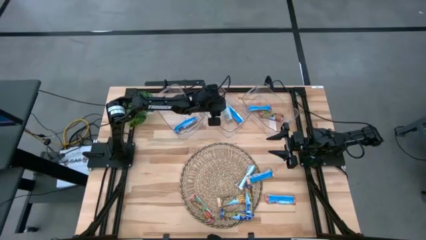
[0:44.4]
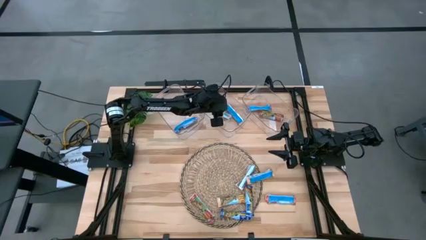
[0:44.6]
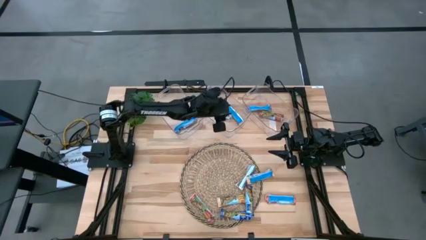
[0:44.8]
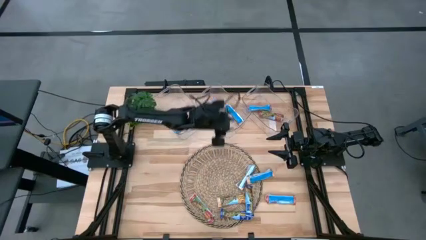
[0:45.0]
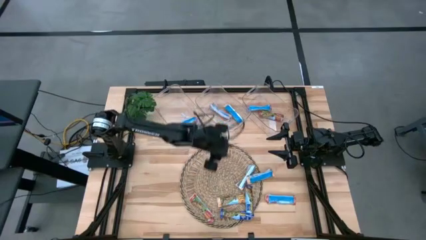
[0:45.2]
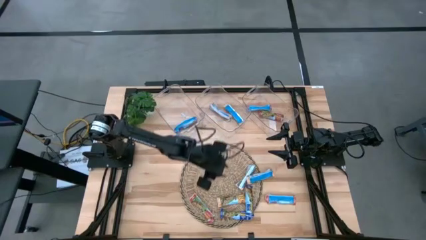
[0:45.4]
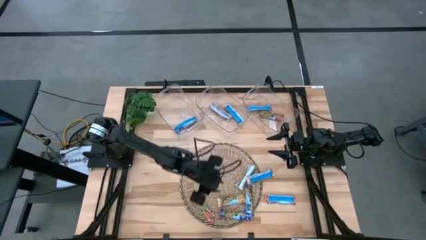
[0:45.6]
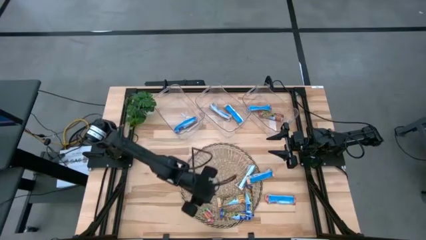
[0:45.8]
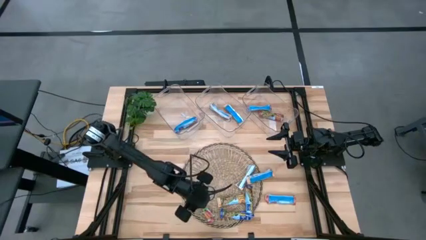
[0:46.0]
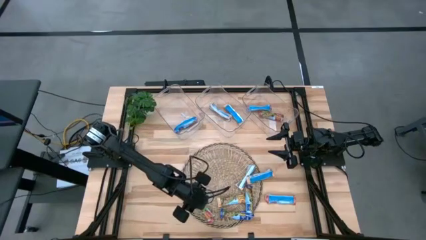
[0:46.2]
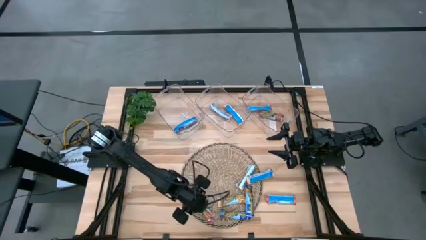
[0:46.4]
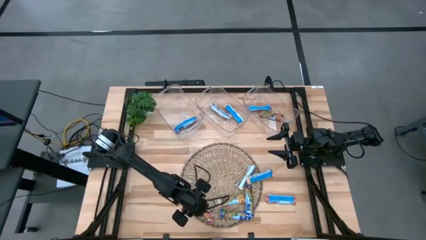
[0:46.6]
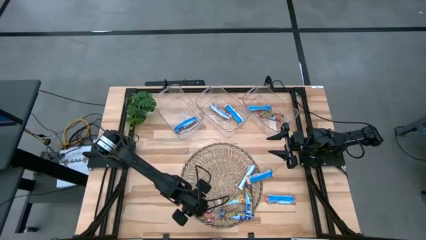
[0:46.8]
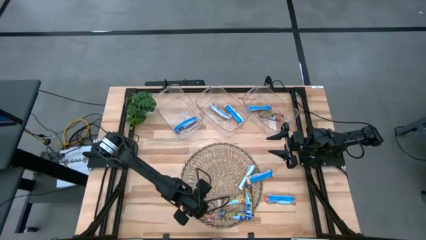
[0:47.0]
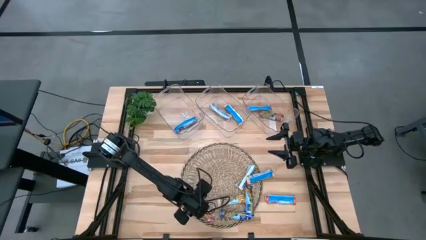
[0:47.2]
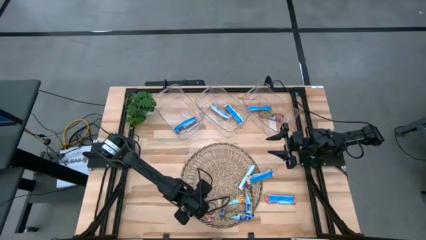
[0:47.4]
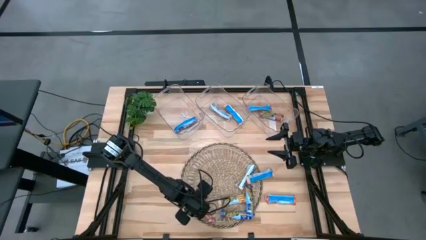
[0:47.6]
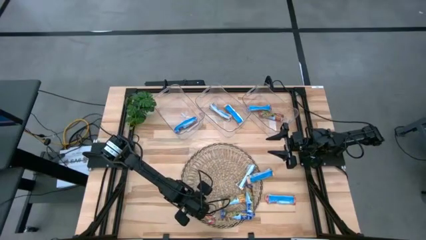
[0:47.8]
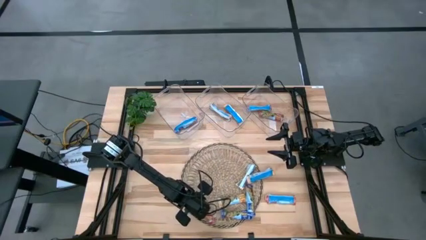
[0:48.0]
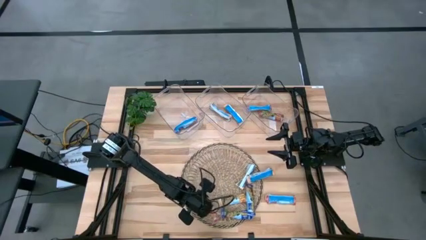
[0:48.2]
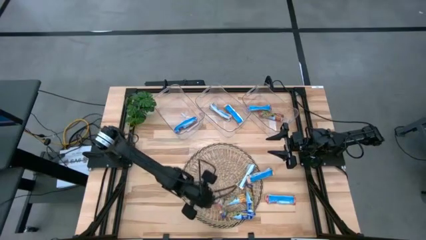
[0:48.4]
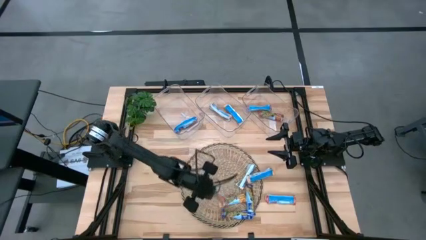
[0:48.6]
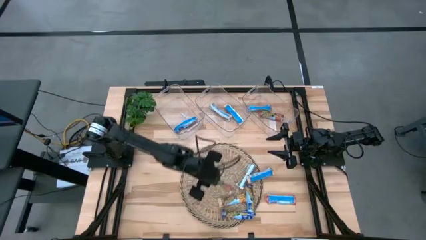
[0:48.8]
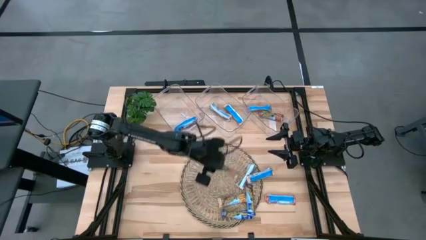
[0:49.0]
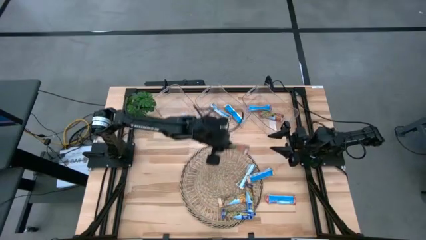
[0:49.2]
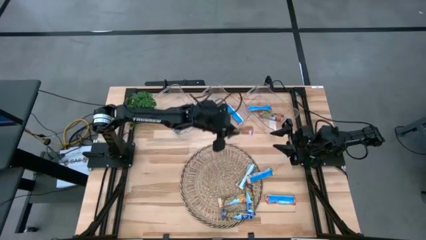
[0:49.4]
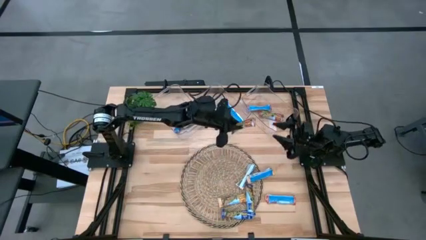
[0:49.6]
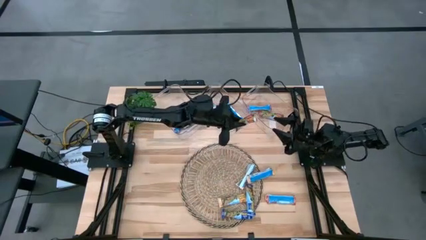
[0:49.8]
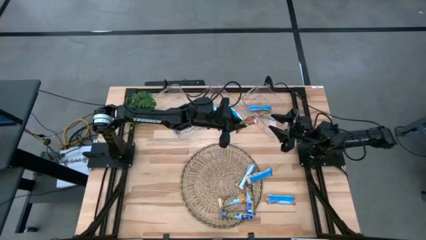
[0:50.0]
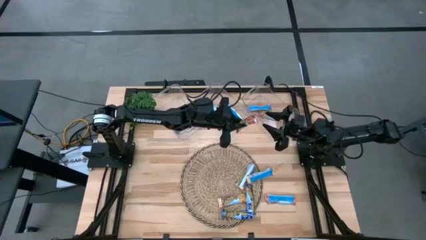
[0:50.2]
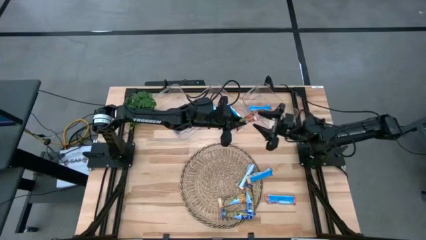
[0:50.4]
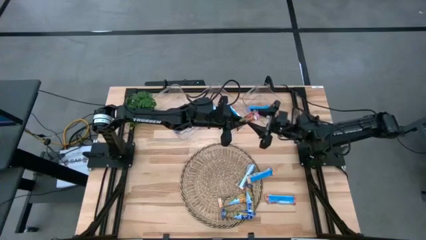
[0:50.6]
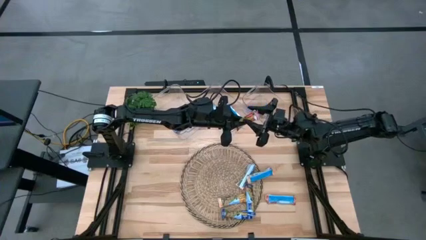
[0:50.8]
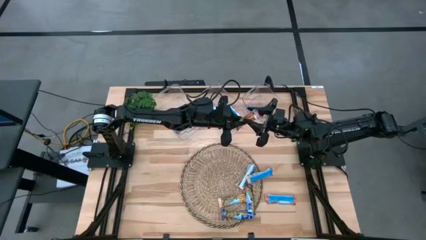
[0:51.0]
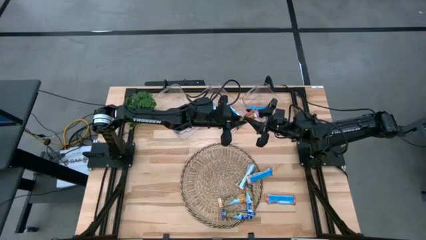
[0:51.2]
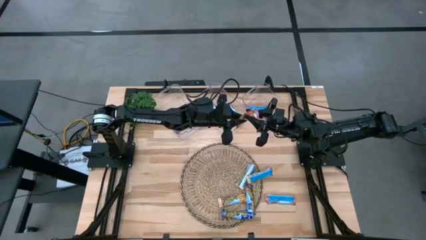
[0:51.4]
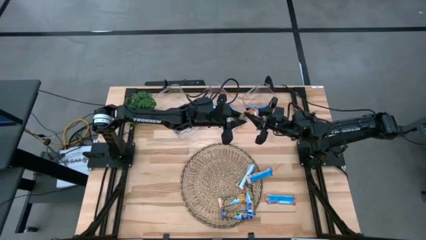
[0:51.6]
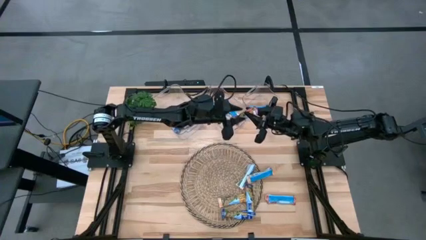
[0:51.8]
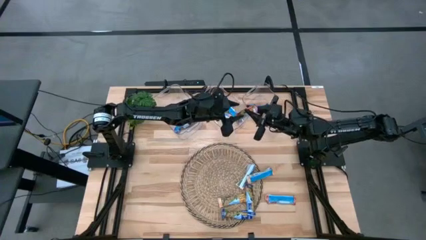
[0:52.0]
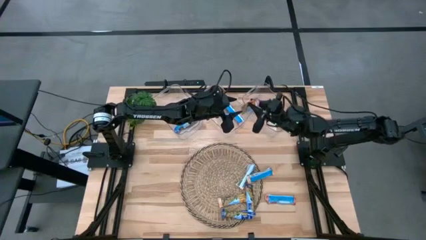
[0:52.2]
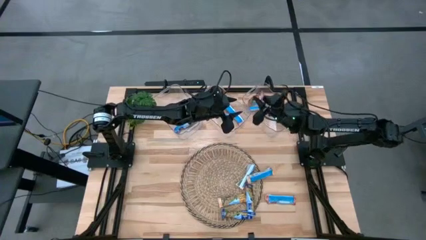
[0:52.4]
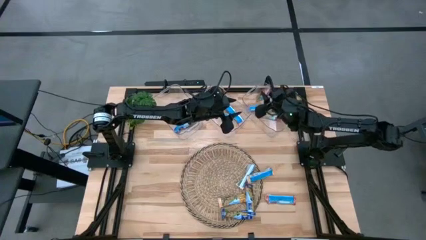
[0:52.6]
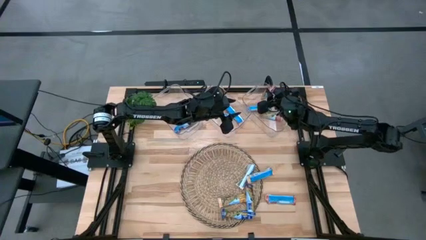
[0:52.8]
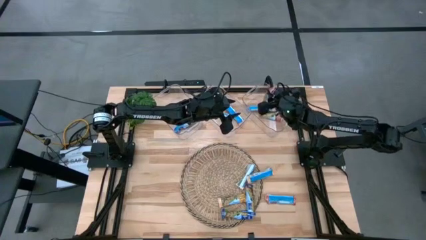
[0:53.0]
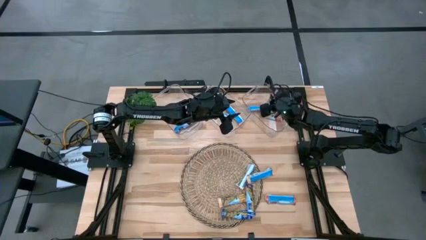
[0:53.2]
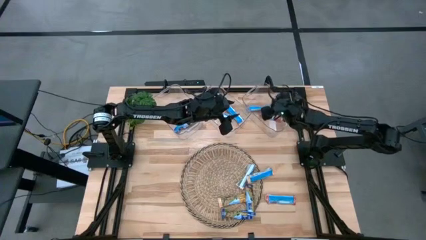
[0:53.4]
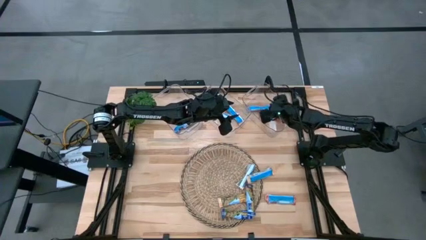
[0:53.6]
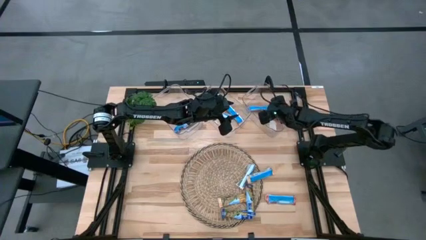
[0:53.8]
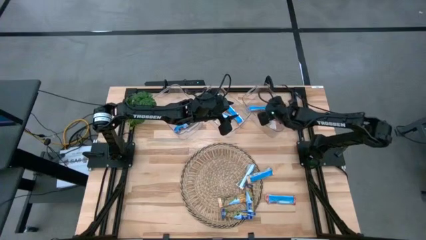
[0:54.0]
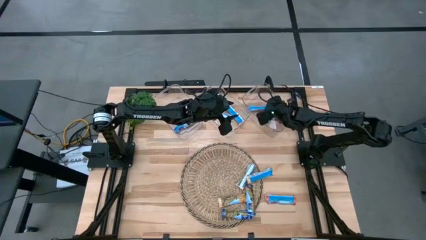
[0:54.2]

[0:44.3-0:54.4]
Task: Pick and place Granola Bars by type
Put the red granola bar into the right transparent bin

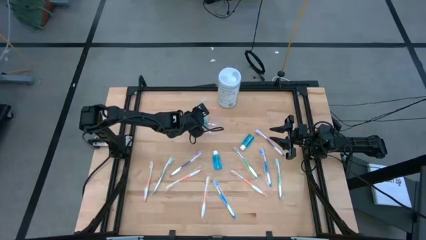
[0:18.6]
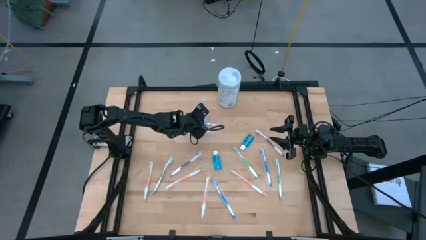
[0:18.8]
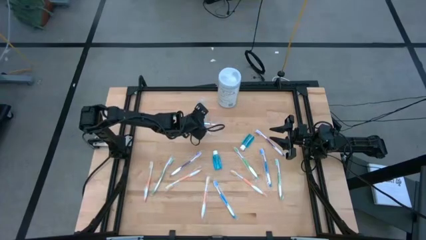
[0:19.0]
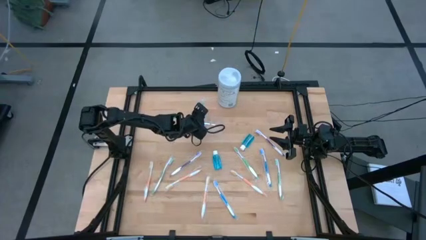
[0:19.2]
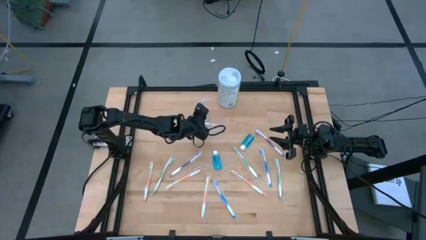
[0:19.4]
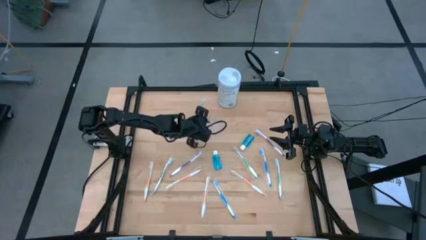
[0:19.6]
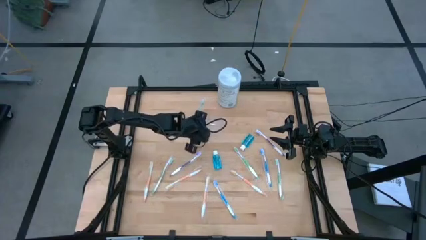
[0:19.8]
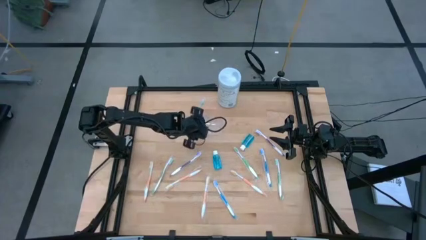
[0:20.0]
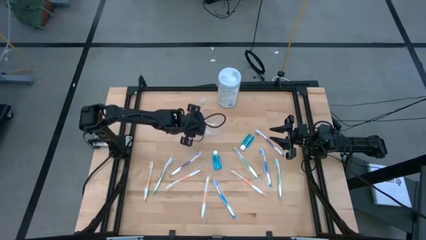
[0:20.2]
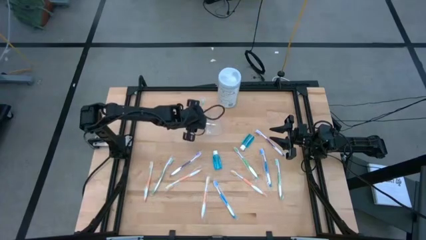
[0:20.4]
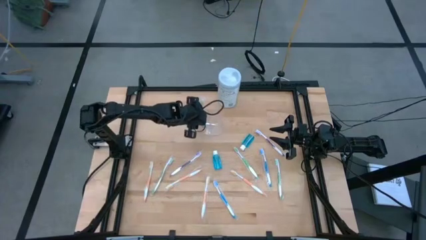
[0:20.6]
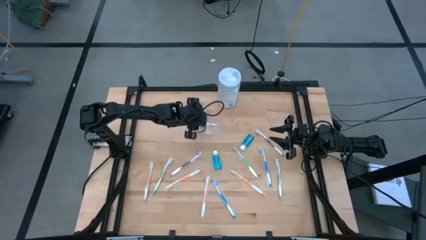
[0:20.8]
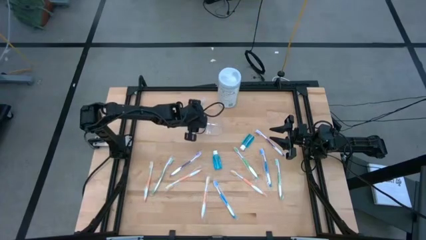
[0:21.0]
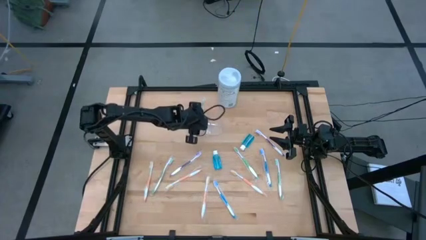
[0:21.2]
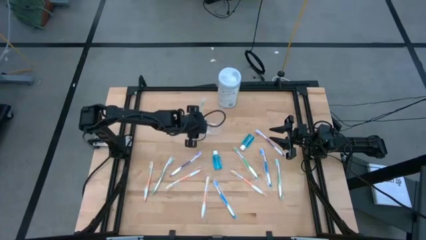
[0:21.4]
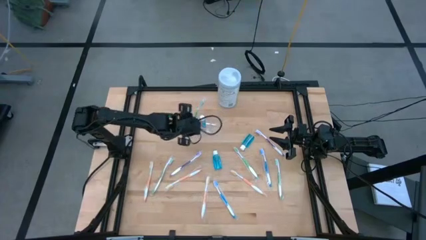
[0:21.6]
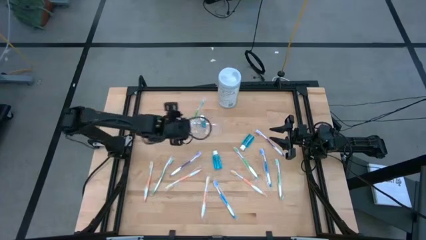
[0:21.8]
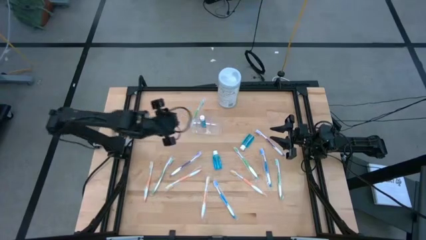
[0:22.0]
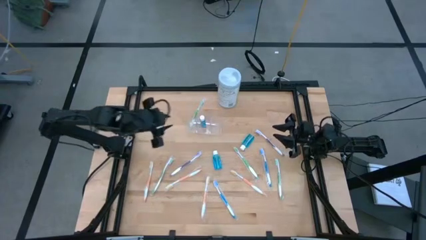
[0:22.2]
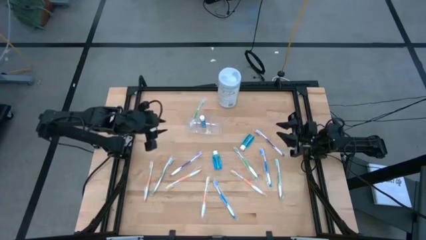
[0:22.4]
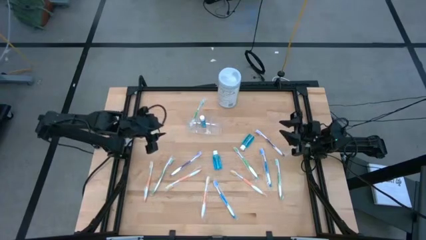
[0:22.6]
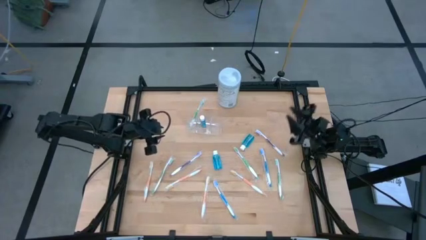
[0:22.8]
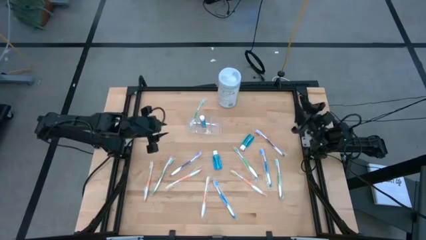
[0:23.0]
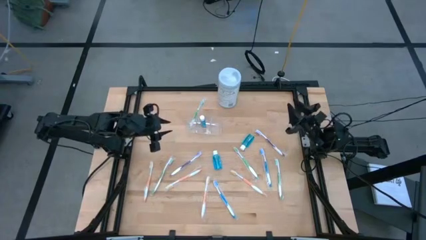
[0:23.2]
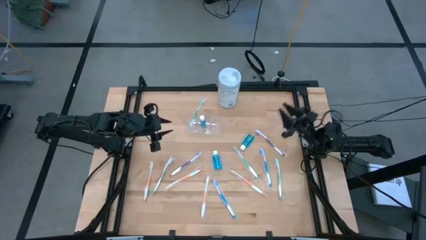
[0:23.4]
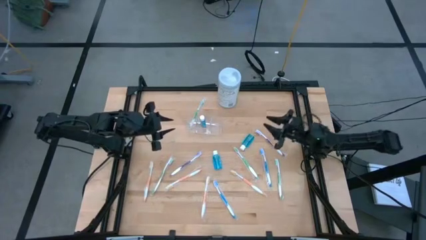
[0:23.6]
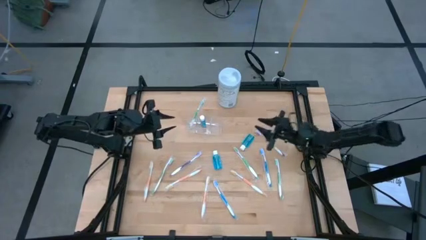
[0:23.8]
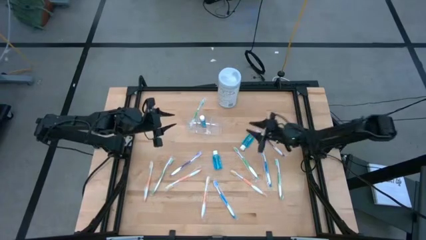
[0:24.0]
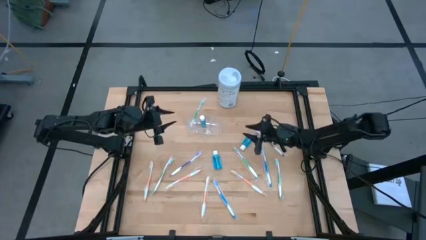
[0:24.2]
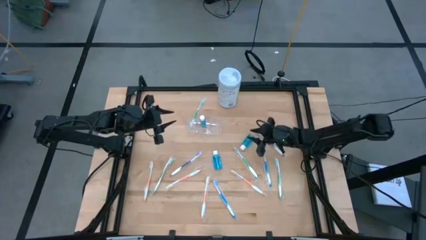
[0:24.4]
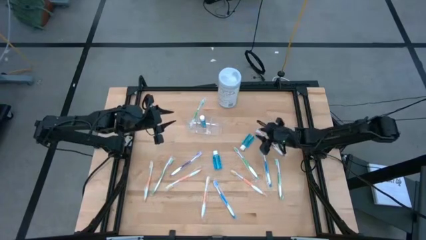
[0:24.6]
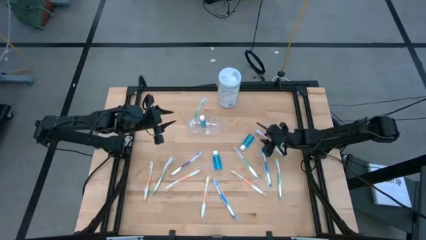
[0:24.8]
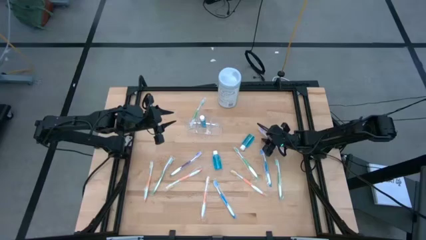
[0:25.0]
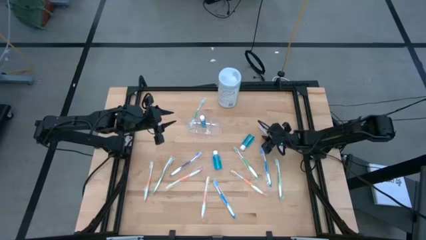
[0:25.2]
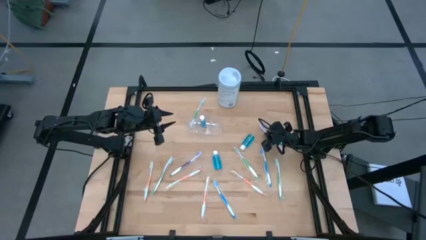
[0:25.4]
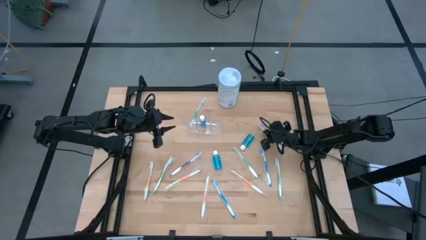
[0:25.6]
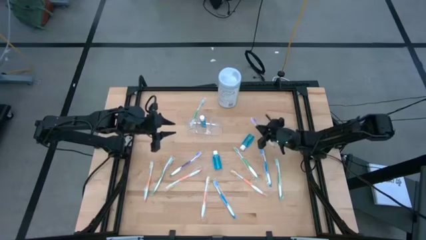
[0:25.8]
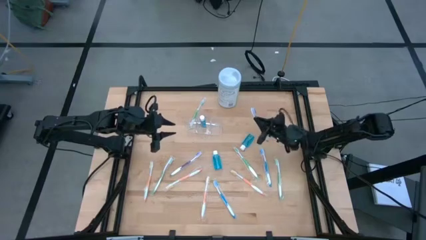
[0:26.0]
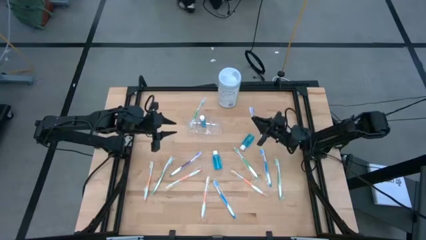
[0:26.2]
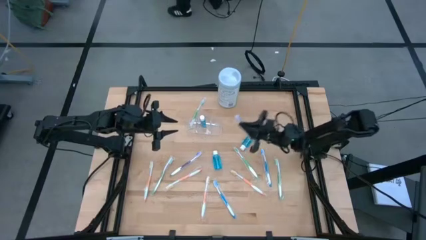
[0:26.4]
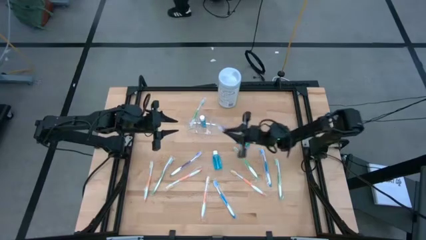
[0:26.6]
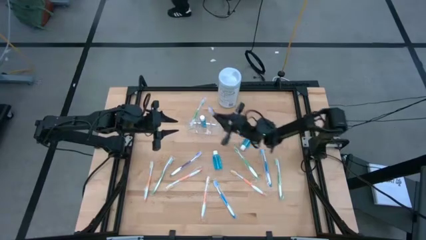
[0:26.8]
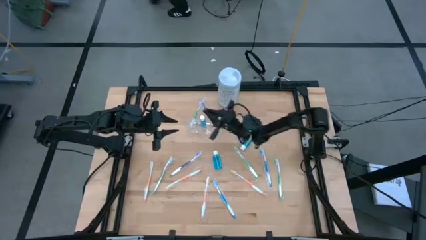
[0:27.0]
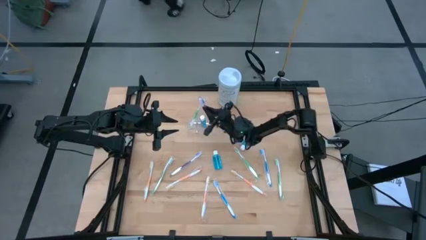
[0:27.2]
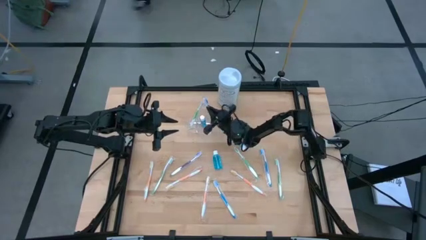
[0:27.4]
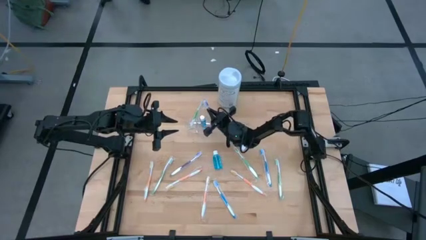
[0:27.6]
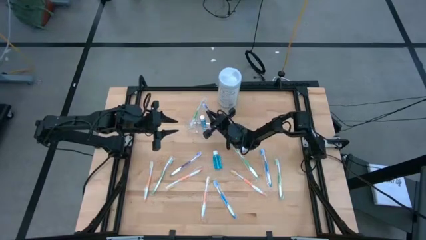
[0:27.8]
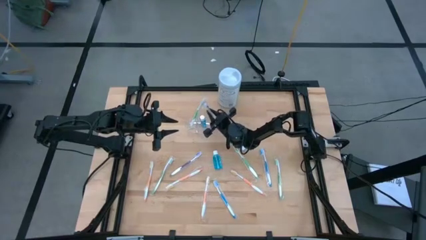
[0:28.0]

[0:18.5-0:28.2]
Task: Pick & Place toothbrushing station
Put the purple toothbrush into the transparent organizer
